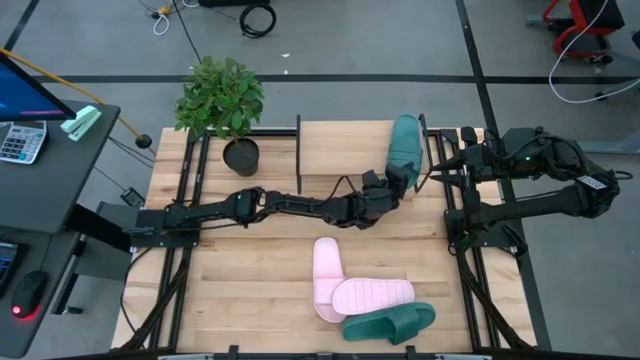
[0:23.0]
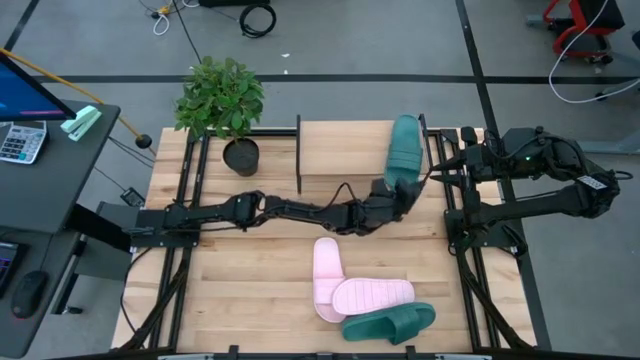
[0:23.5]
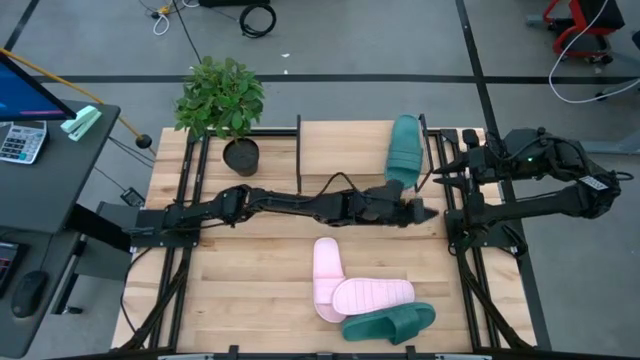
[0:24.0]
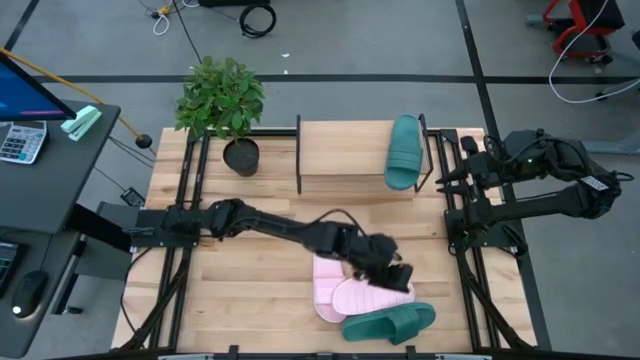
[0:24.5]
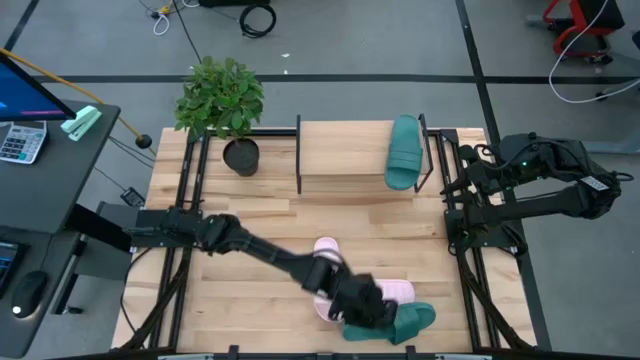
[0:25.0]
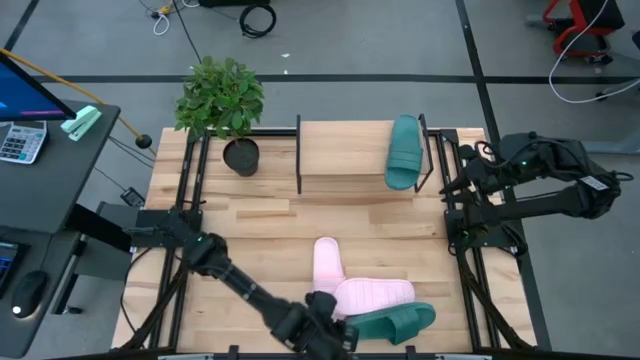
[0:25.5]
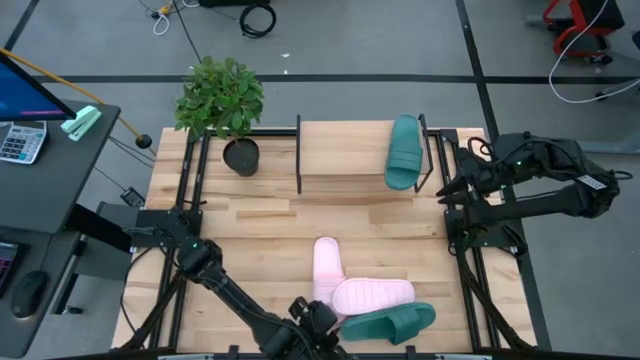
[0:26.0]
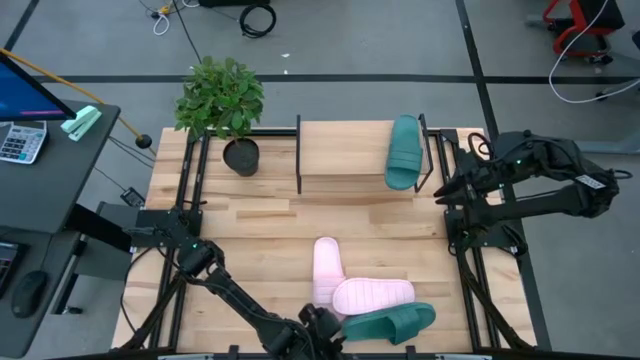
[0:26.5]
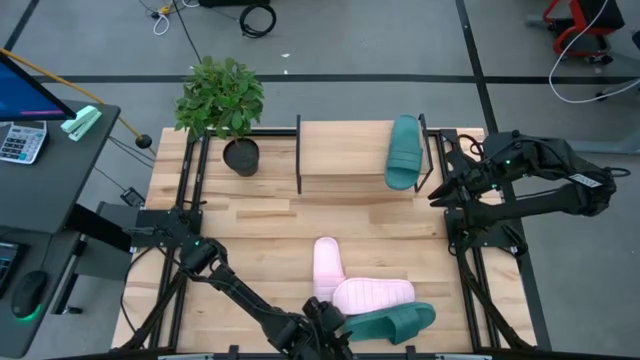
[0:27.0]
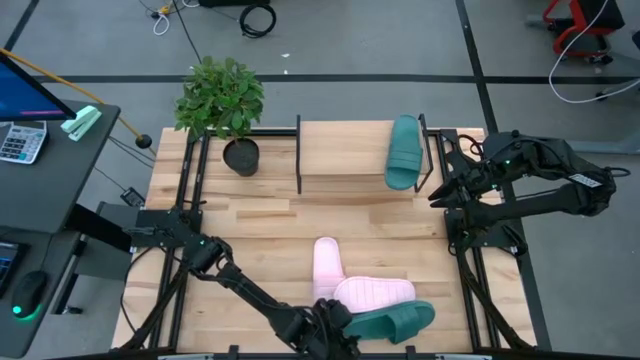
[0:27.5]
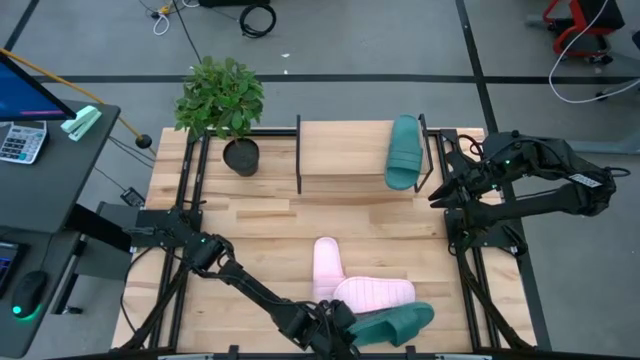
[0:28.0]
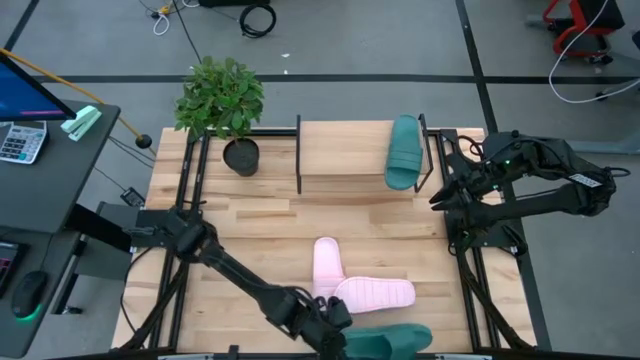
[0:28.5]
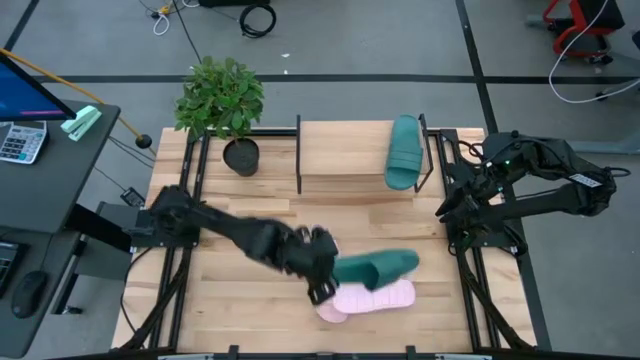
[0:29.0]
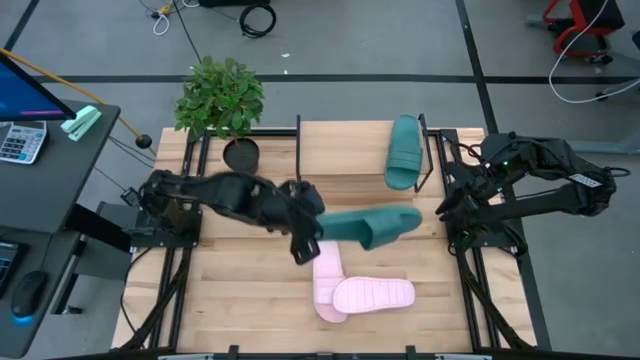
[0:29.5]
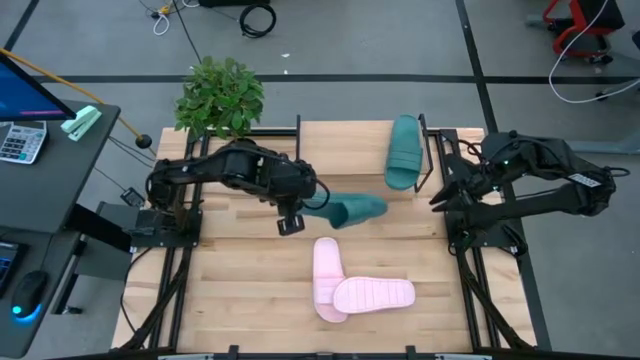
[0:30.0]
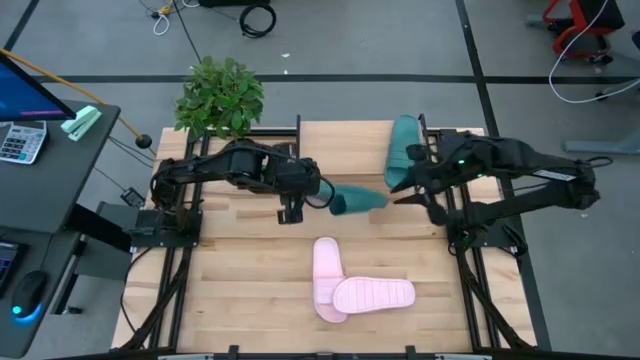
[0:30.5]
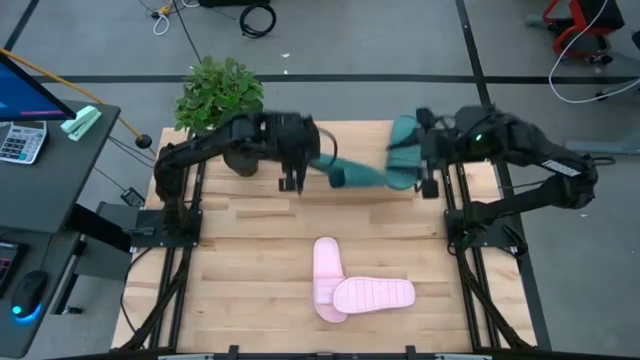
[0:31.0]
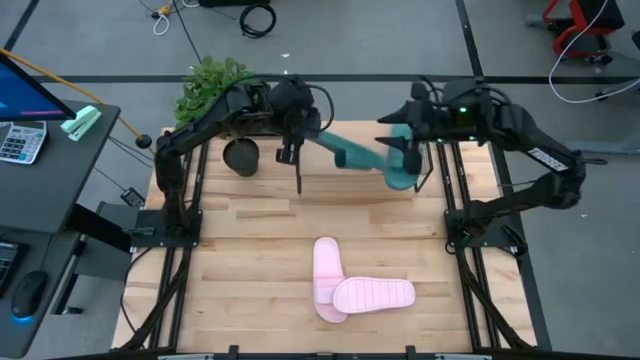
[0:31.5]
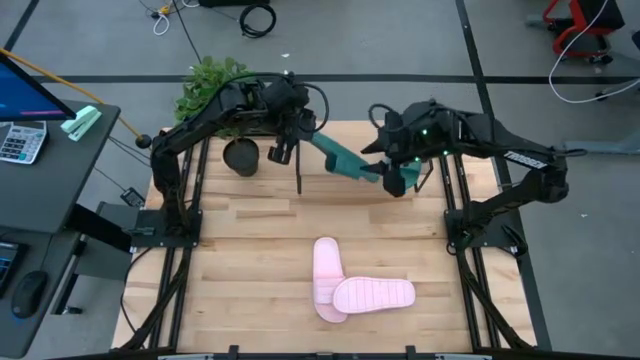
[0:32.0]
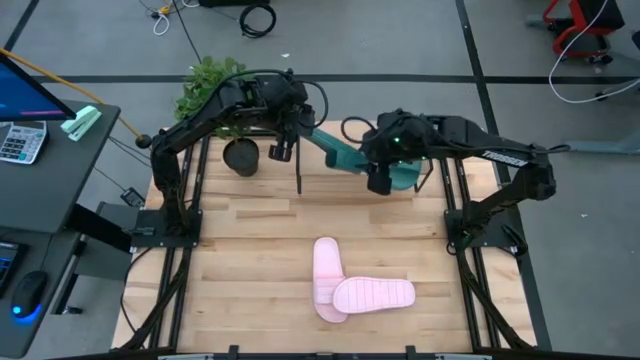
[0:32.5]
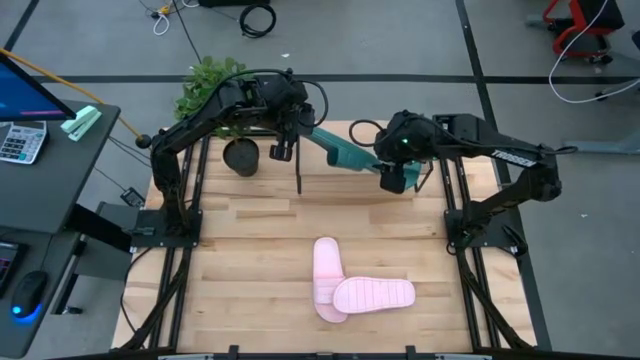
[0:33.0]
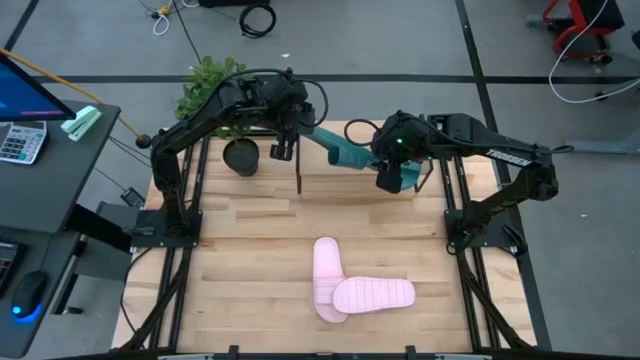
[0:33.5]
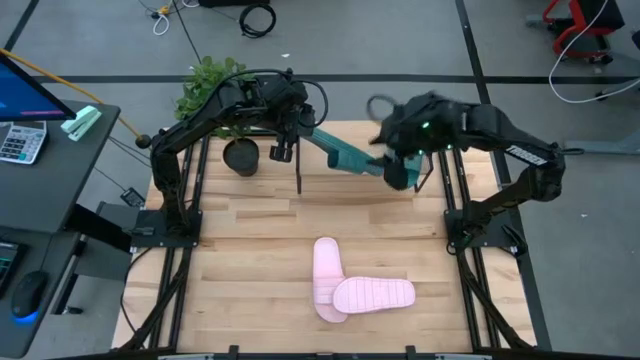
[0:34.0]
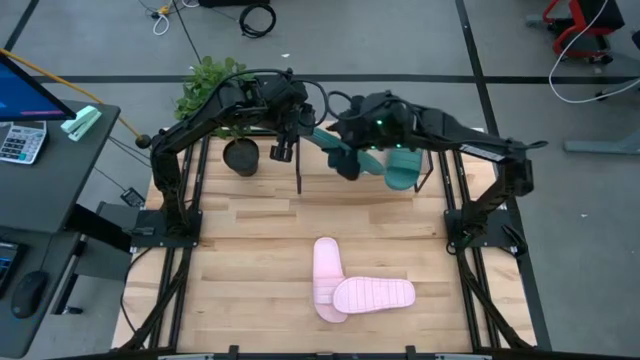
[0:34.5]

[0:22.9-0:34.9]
Task: Pick and place slides into the shelf
Put the dark green slipper on the shelf

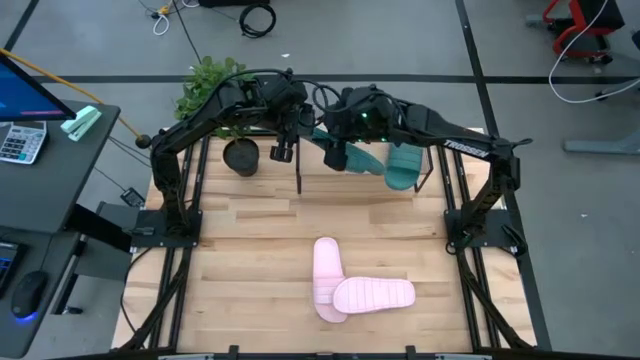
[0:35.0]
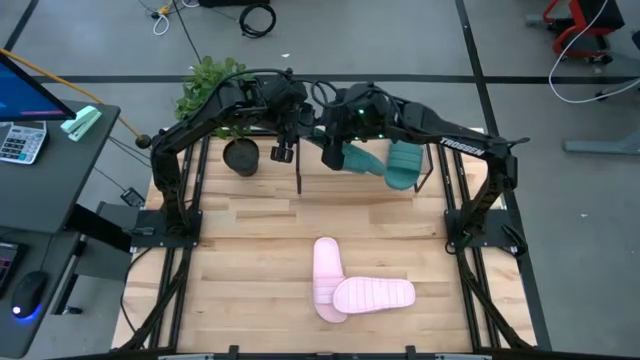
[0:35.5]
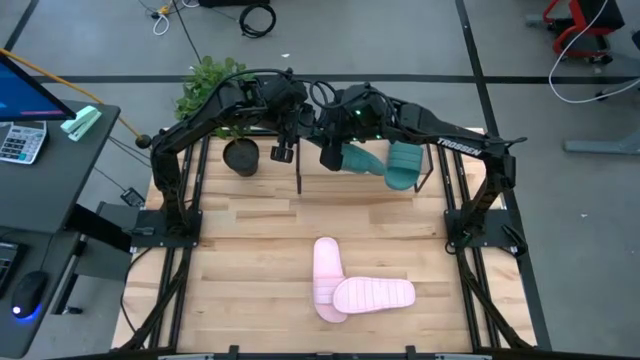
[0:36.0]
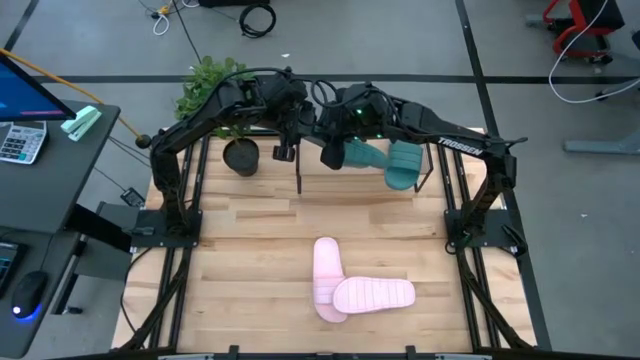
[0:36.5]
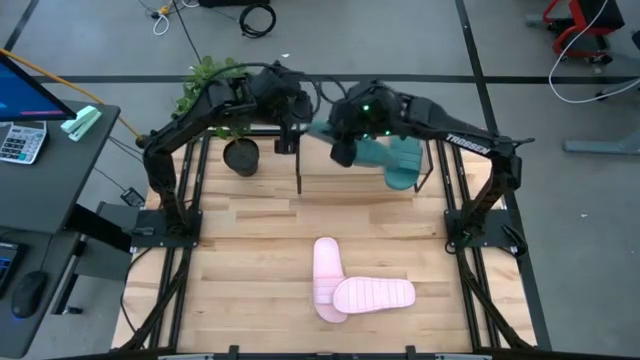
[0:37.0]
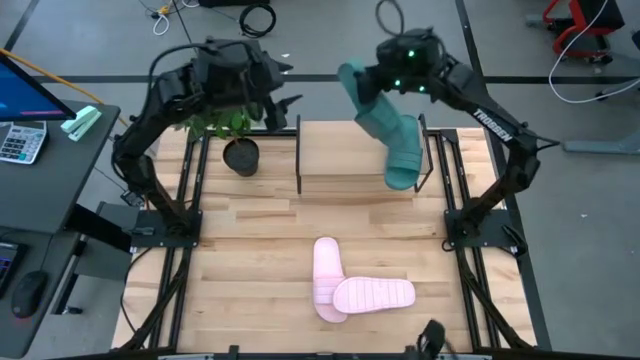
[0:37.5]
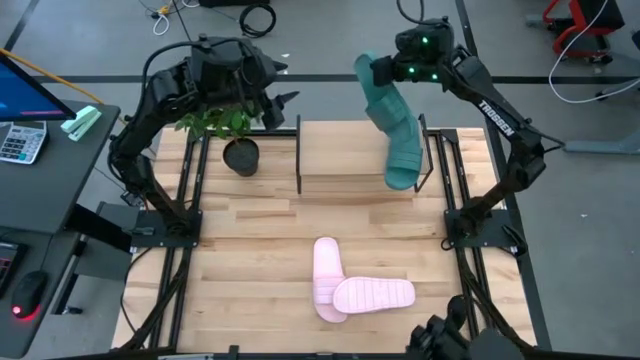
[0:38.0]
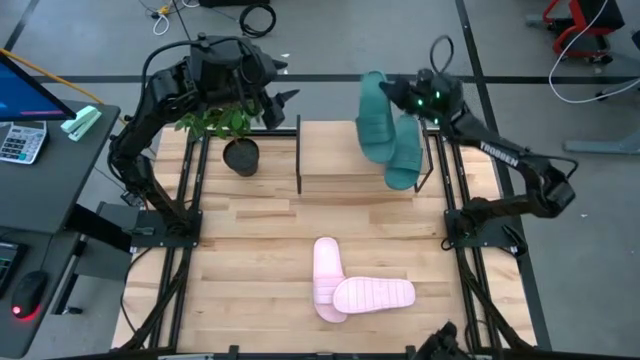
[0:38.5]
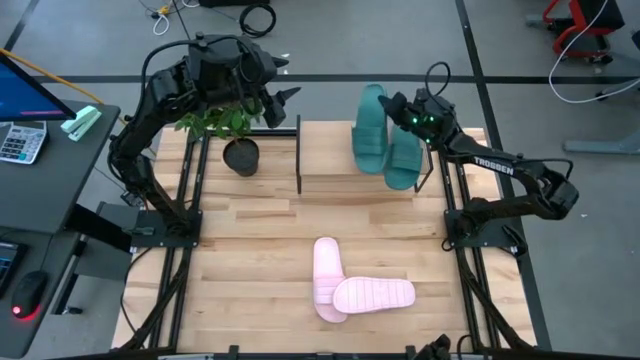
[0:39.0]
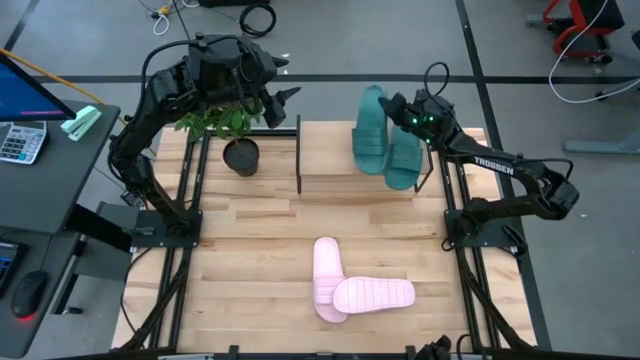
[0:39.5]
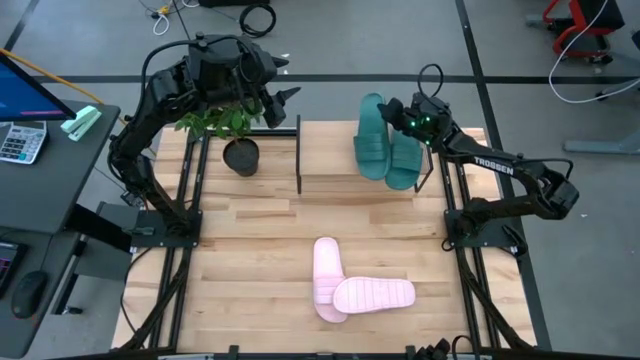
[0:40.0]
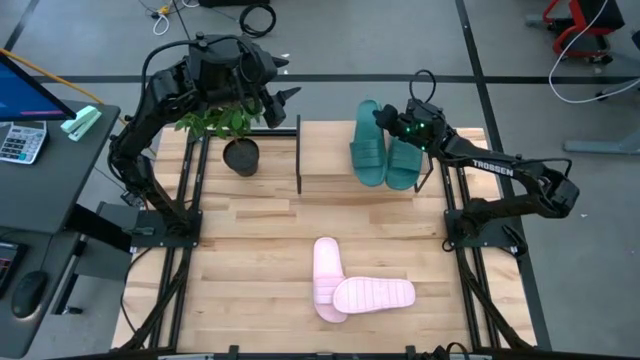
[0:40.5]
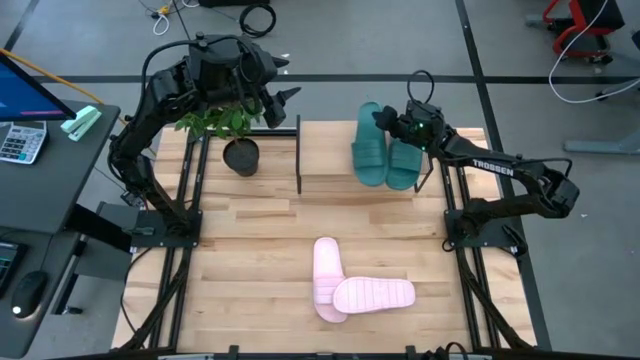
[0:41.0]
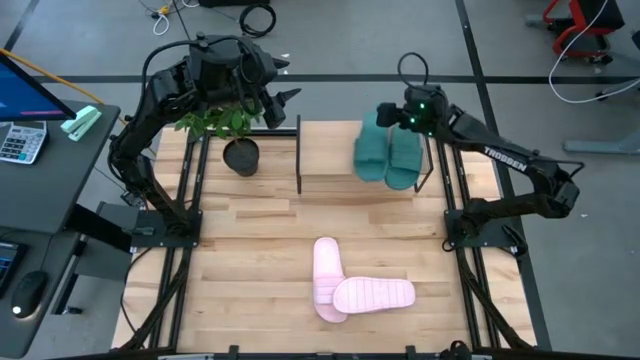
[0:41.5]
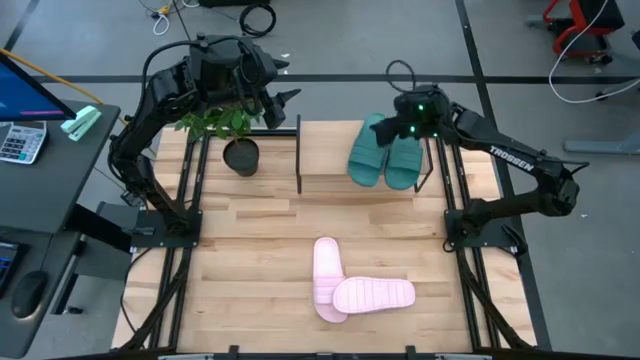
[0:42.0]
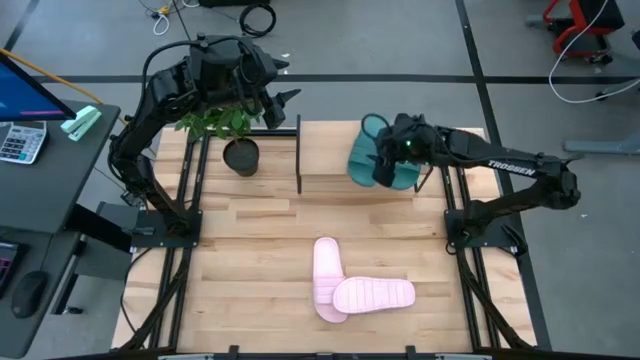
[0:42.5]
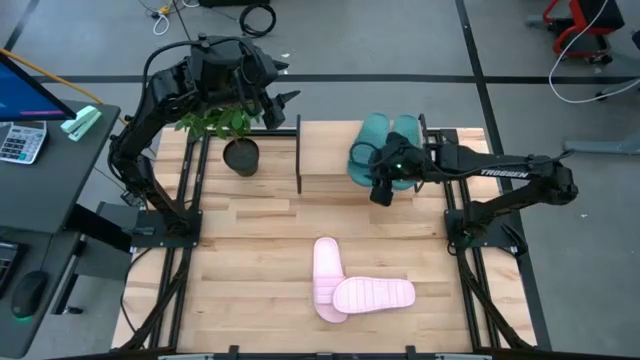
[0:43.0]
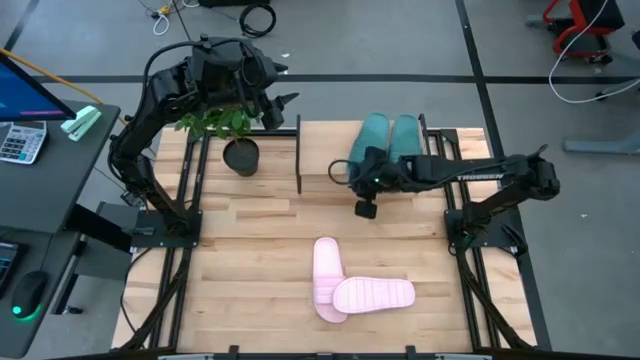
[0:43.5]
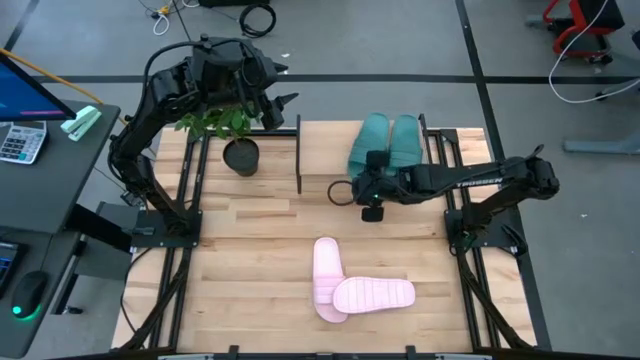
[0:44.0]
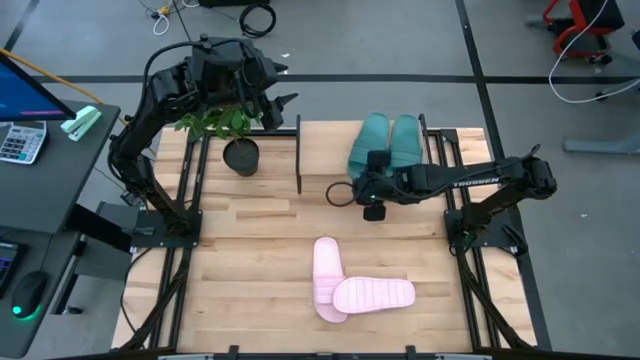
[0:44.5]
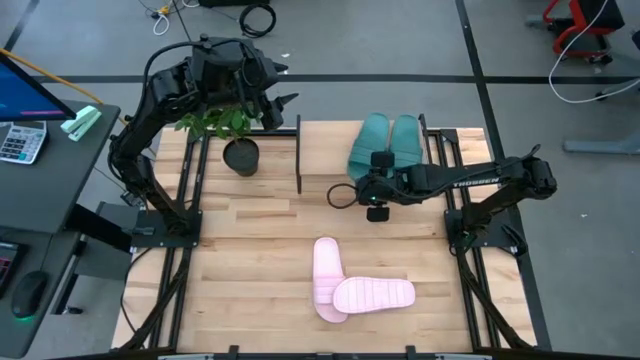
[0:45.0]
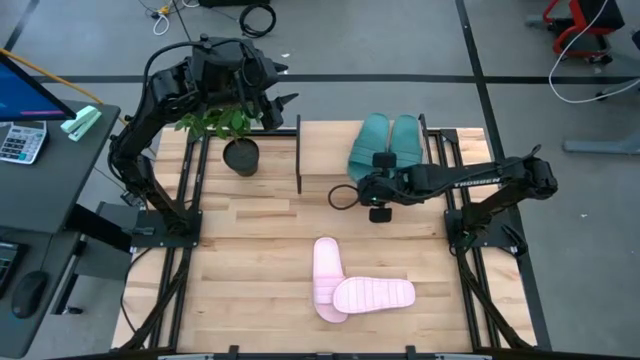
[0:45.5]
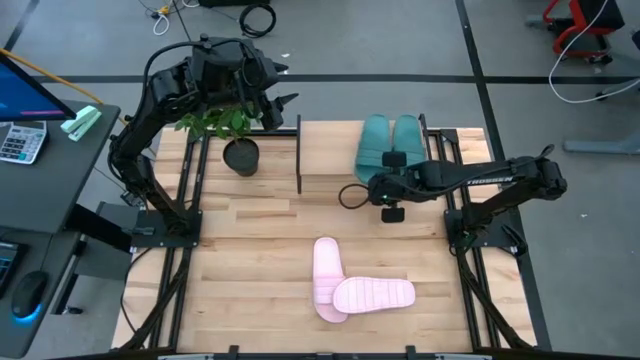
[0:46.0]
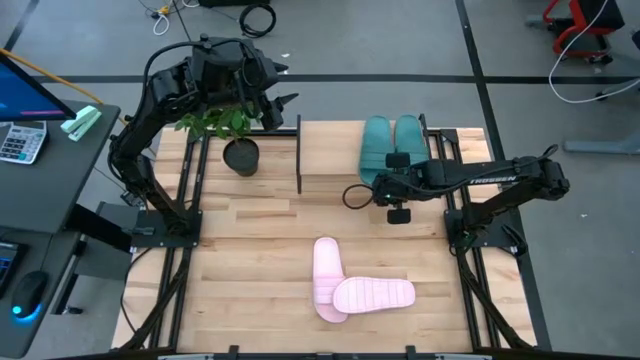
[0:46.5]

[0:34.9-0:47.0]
Put the dark green slipper on the shelf
